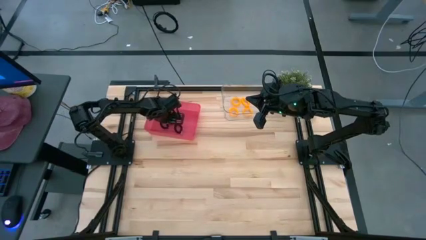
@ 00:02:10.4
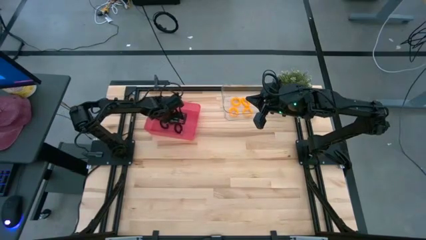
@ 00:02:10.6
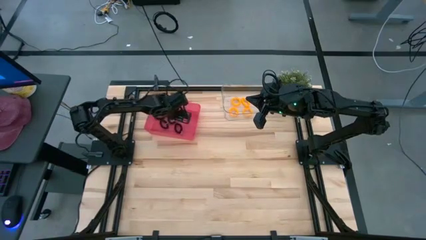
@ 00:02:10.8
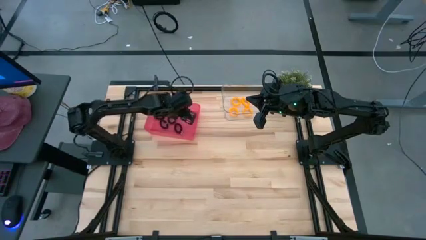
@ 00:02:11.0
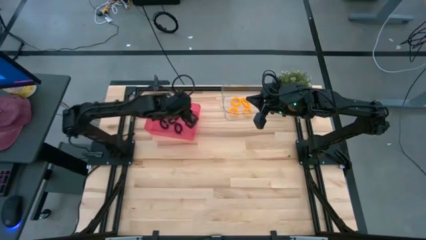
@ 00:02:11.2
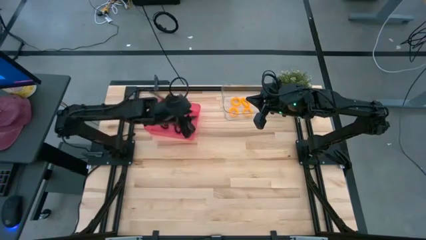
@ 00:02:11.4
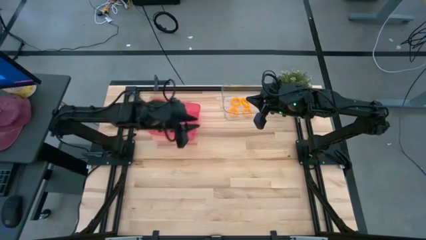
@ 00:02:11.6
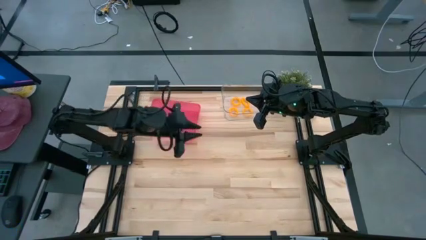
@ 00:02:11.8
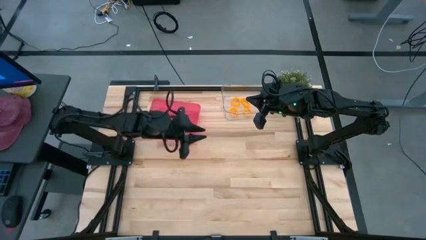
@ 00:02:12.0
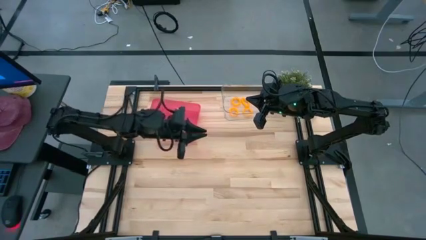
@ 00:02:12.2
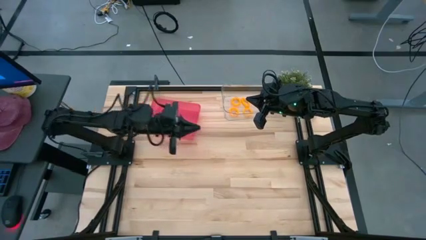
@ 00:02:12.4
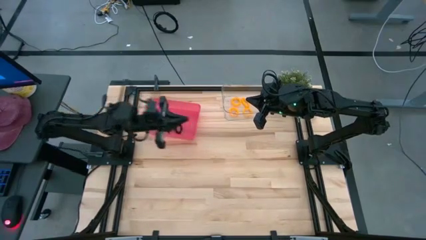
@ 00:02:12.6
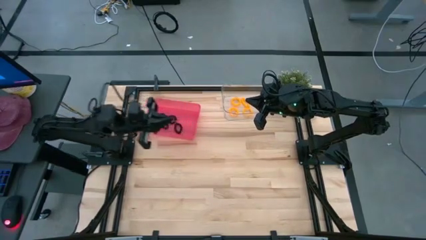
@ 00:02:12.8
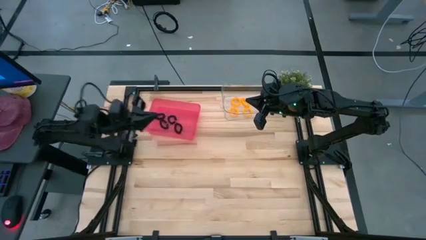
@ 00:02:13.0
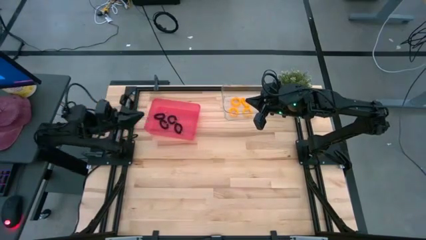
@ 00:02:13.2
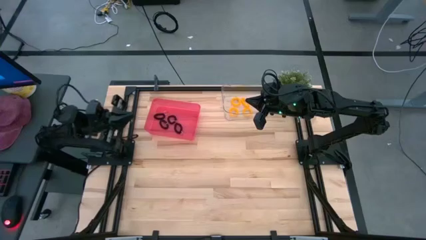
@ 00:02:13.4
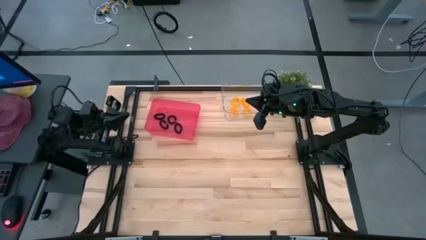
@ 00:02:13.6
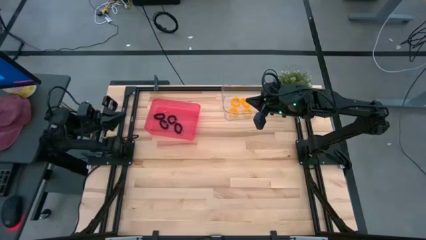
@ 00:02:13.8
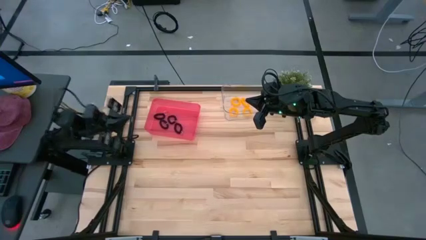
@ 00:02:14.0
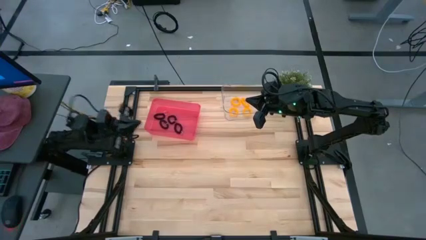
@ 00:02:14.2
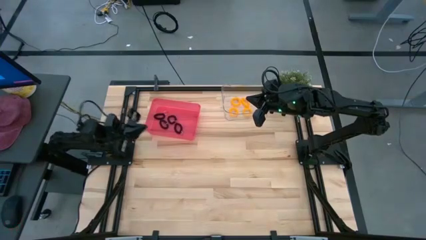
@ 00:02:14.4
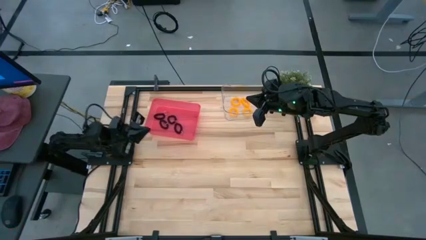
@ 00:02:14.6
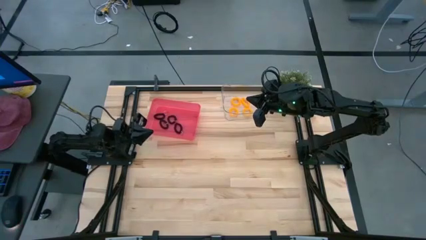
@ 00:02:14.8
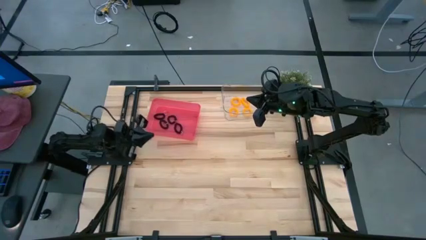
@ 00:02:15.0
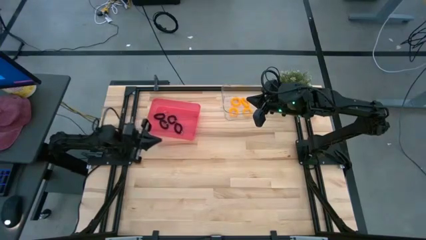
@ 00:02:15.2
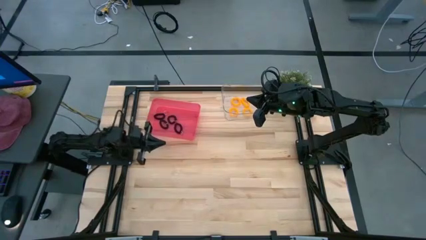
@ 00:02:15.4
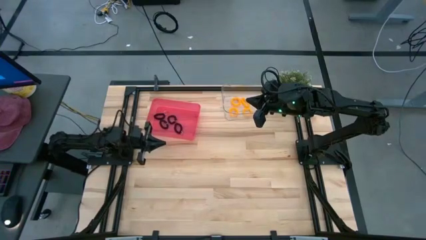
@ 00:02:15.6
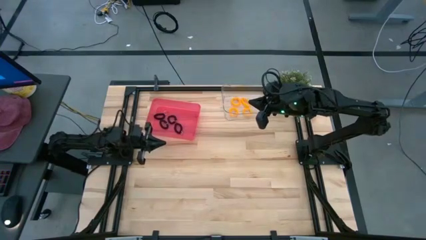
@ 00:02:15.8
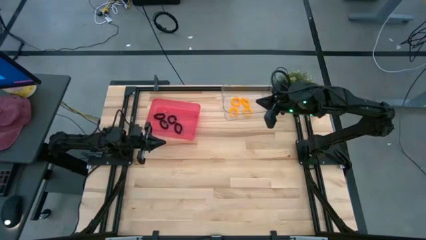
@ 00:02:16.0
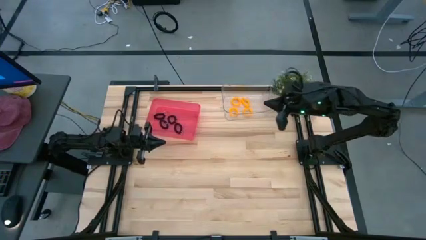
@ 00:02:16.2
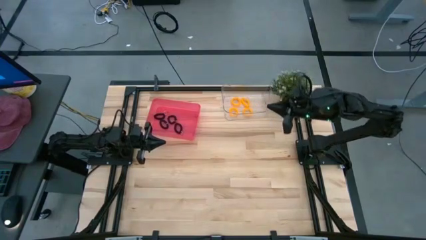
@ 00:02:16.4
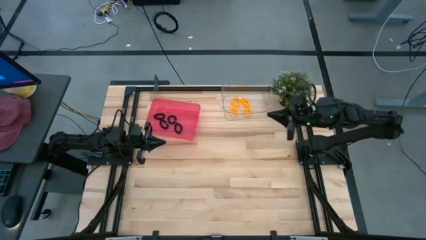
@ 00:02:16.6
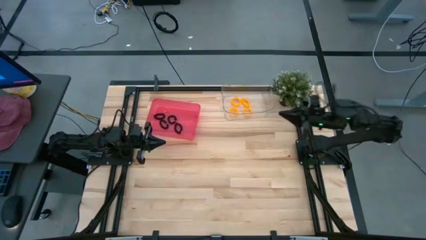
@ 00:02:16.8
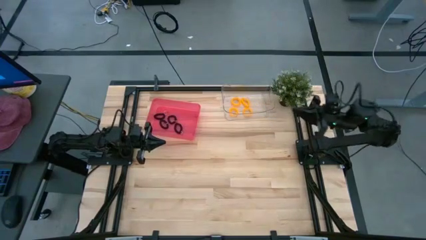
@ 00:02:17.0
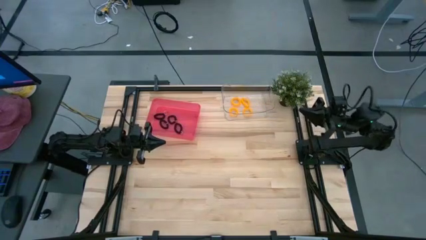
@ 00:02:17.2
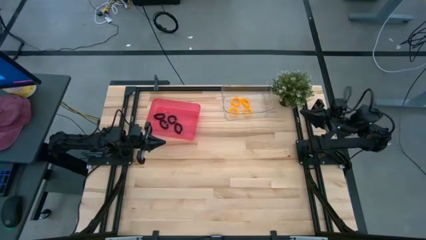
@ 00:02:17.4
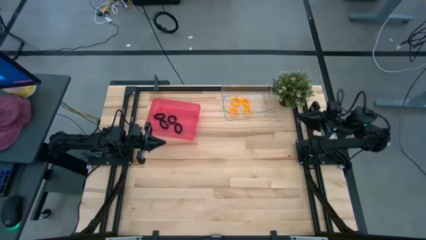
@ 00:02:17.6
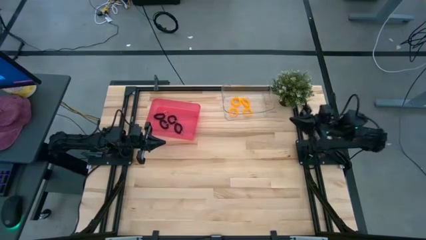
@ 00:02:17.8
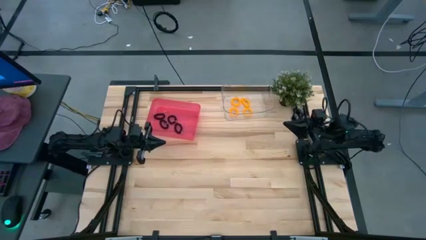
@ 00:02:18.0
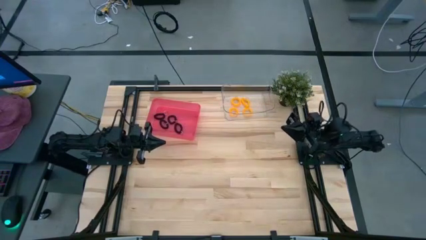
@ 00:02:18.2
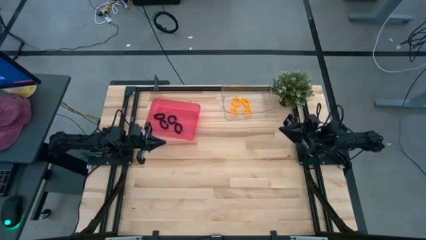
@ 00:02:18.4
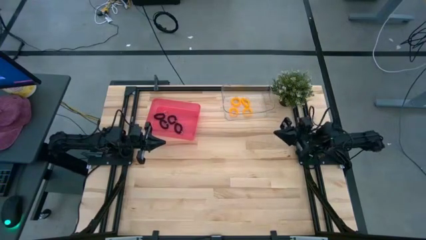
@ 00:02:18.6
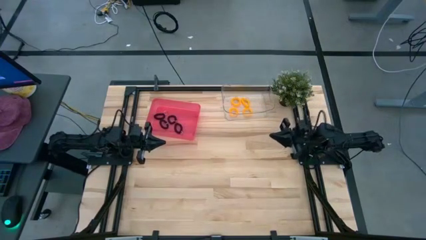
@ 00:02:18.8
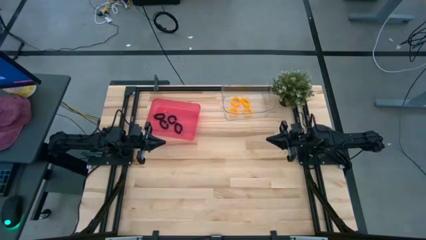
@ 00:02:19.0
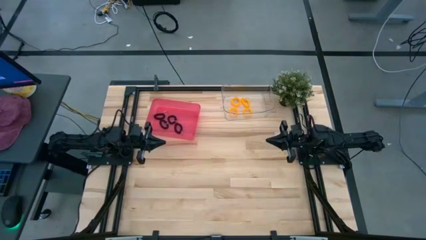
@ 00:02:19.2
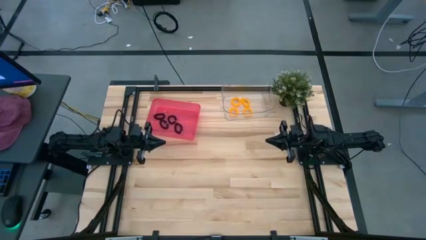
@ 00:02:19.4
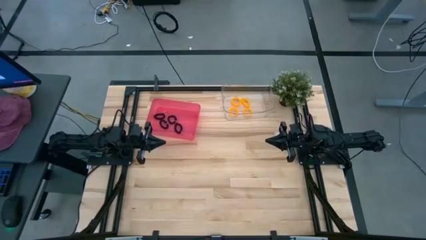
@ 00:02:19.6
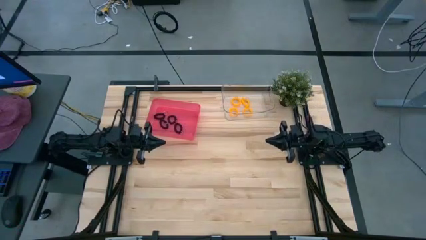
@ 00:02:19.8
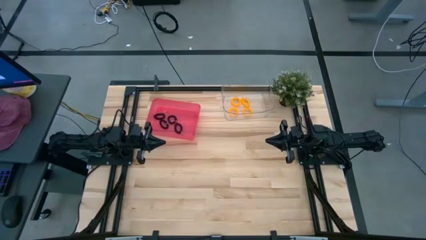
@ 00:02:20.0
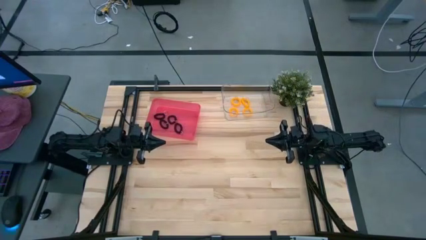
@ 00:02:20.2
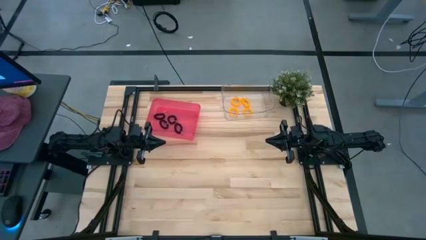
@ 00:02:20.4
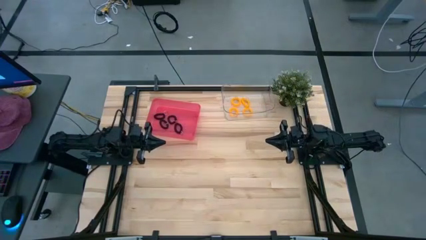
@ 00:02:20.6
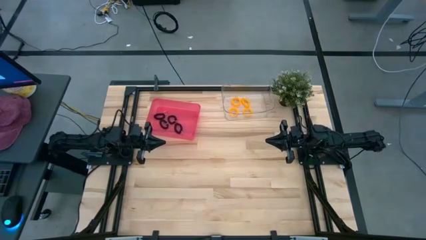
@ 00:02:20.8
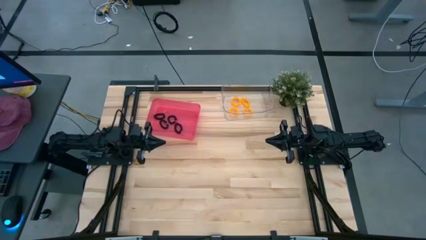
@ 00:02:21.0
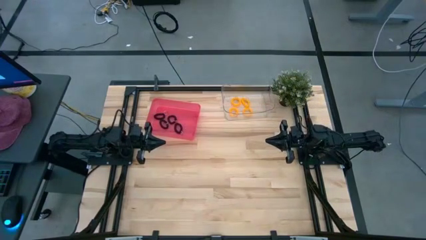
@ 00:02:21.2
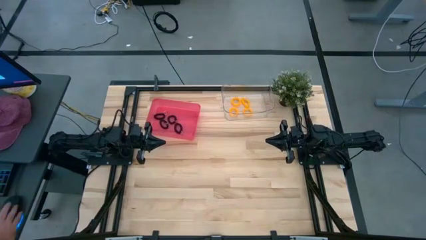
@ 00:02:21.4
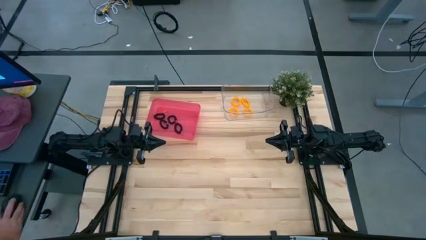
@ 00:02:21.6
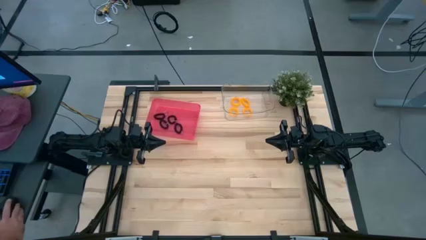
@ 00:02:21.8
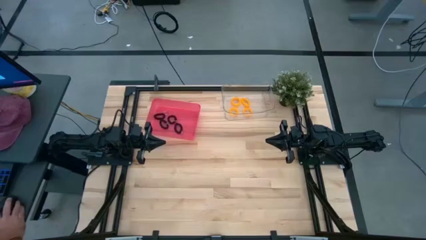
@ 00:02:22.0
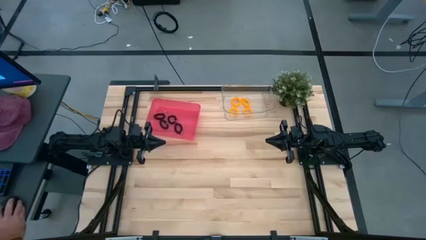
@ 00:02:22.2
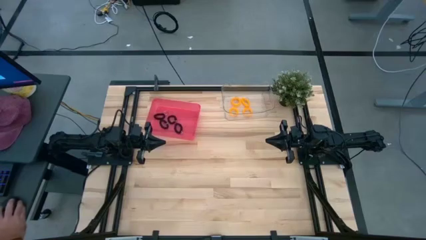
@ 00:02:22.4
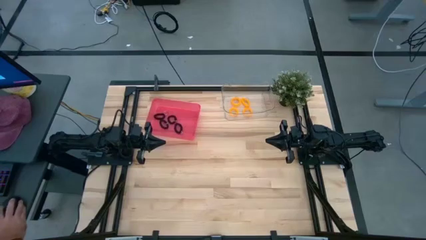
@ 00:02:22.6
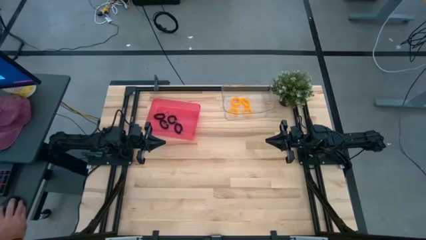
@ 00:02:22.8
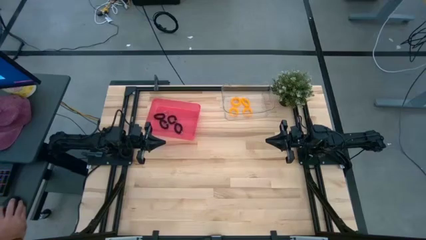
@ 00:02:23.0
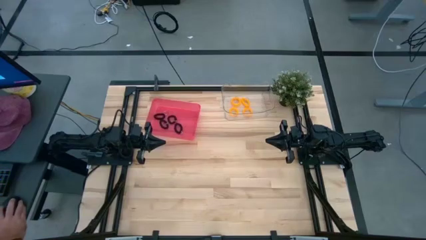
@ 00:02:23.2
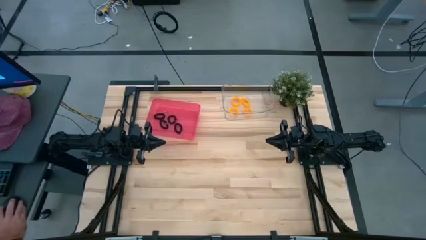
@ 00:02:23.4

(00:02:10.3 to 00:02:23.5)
Task: Sort spring keychains
Return to Home Position
